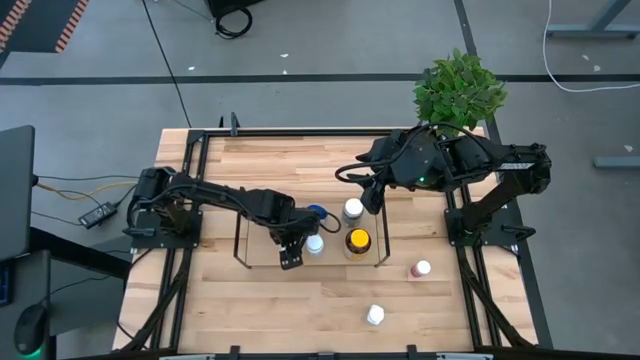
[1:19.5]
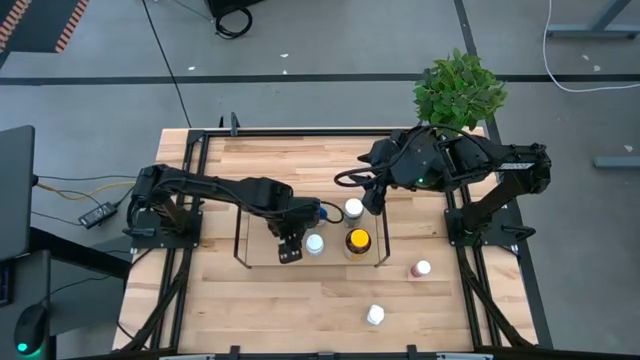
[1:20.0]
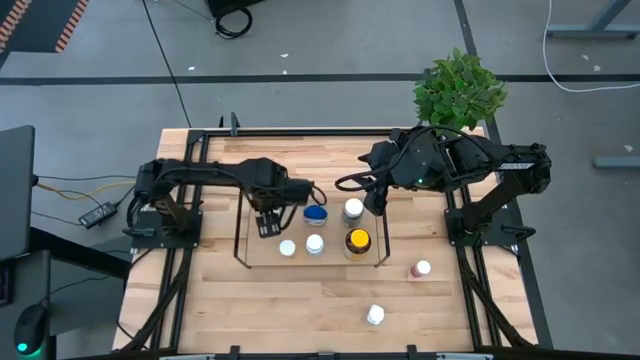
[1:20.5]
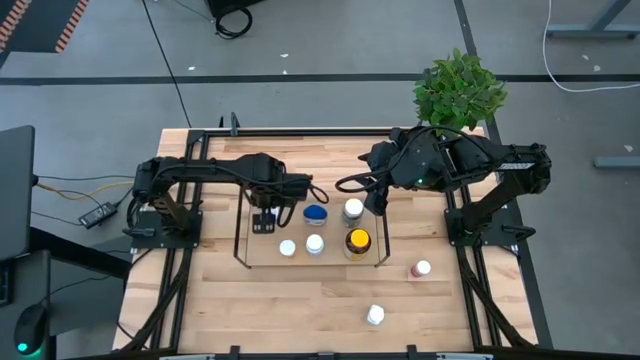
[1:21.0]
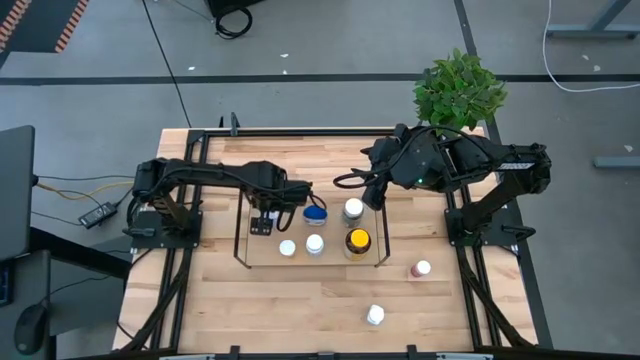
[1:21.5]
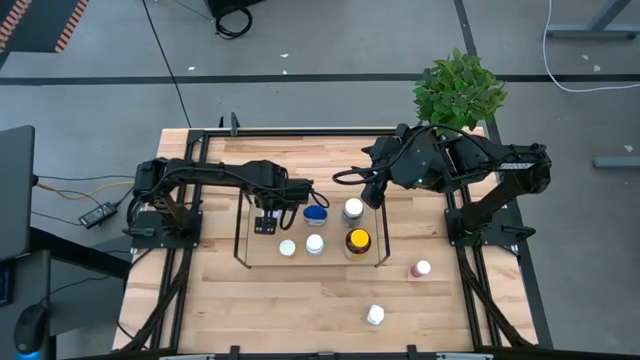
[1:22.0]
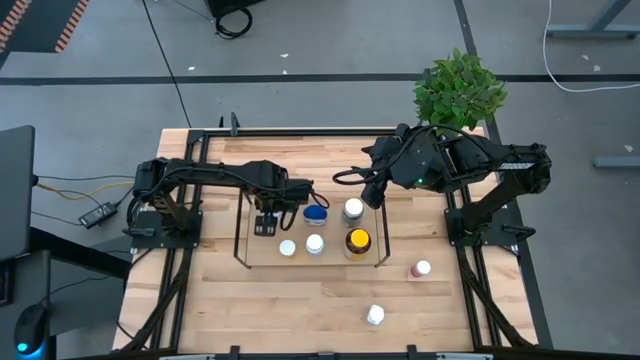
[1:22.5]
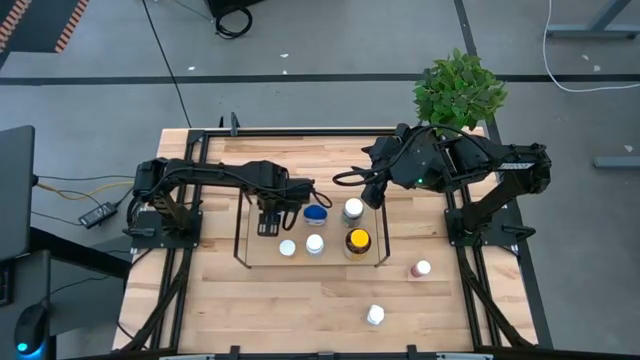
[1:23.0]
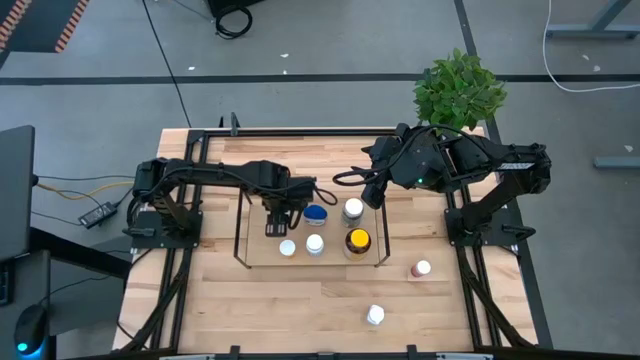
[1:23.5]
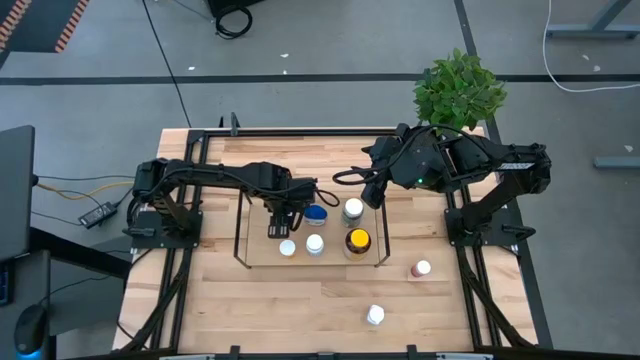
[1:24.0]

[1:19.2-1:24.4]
Task: Pick and place medicine bottles onto shelf by color
Adjust the white and blue medicine bottle on the shelf

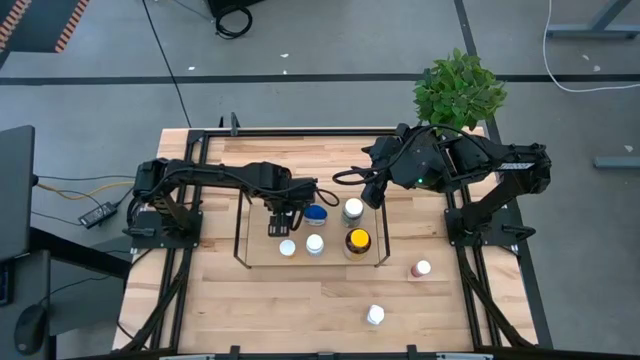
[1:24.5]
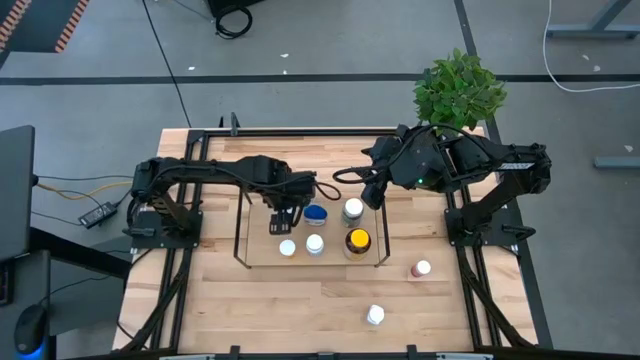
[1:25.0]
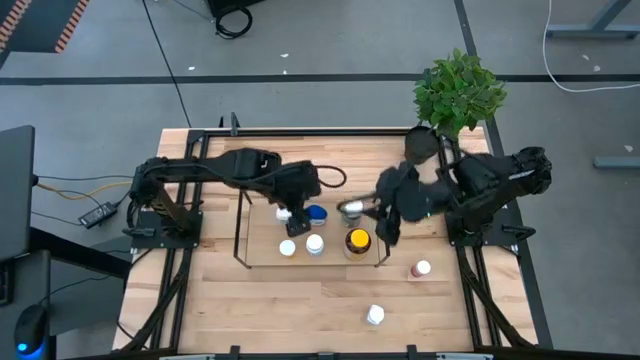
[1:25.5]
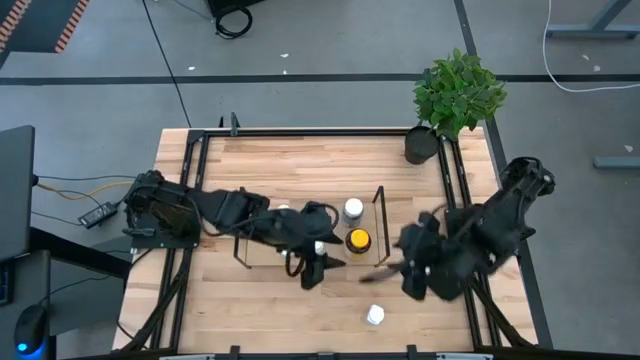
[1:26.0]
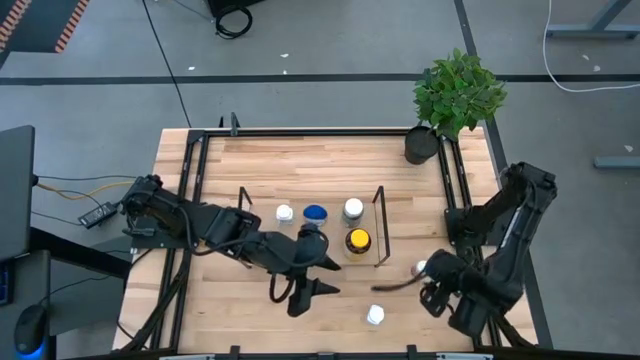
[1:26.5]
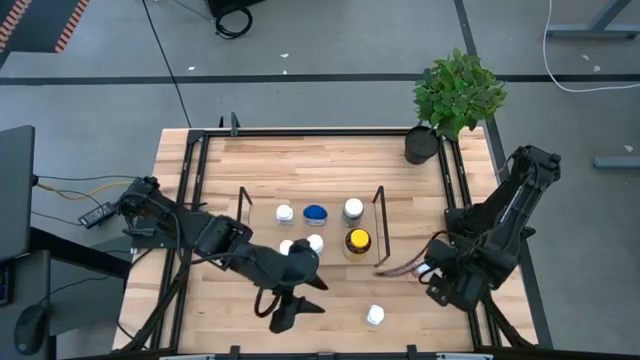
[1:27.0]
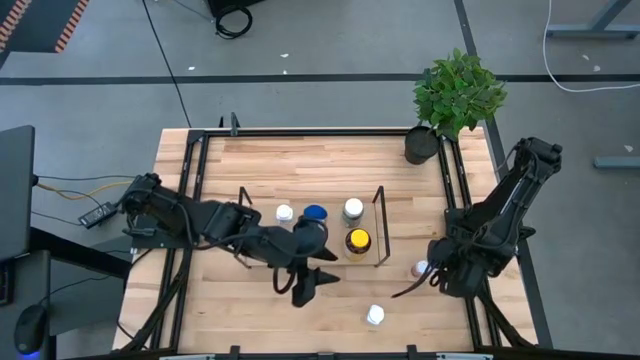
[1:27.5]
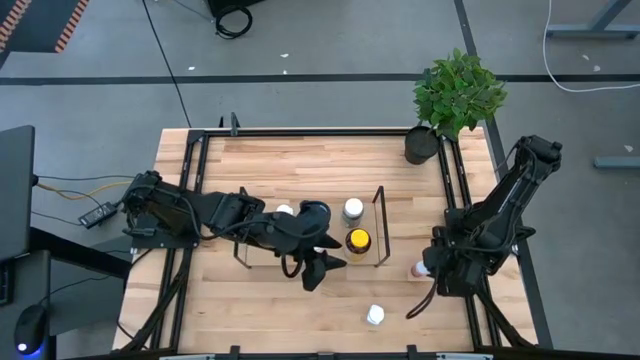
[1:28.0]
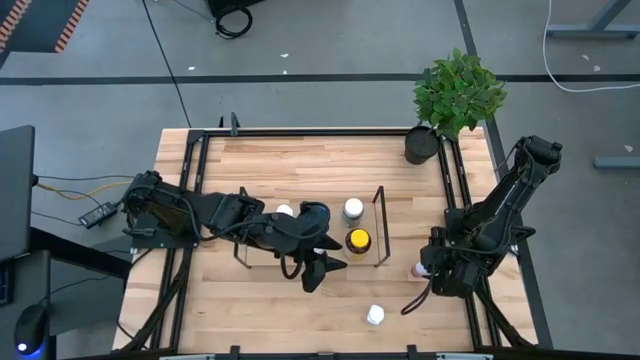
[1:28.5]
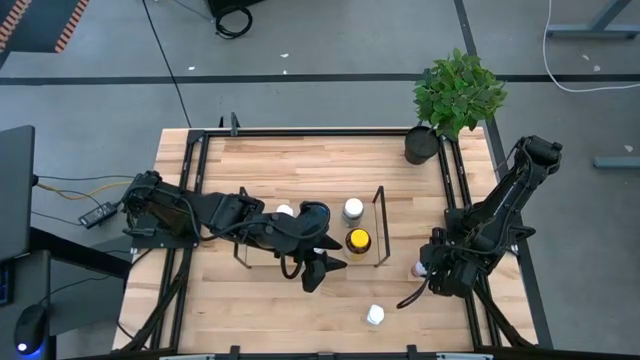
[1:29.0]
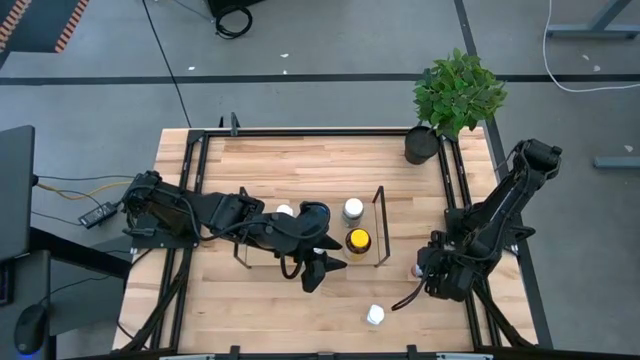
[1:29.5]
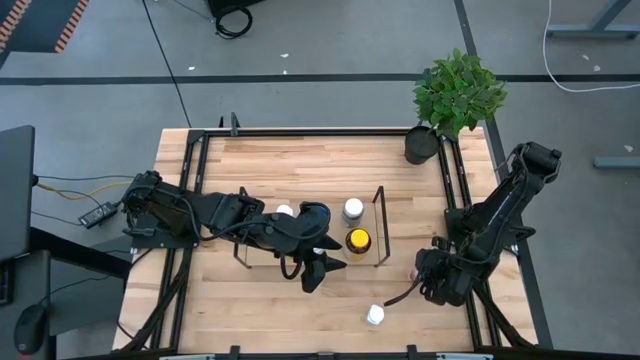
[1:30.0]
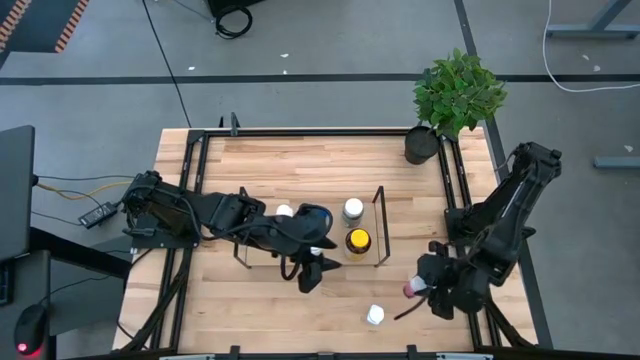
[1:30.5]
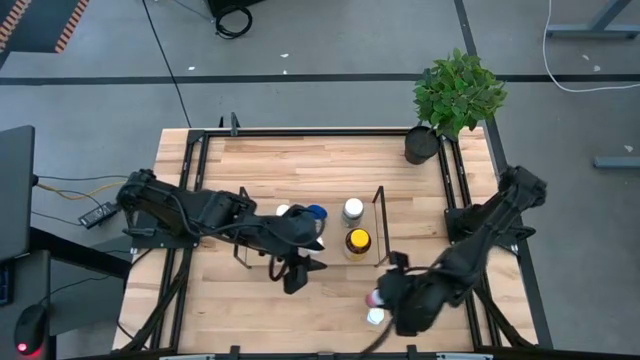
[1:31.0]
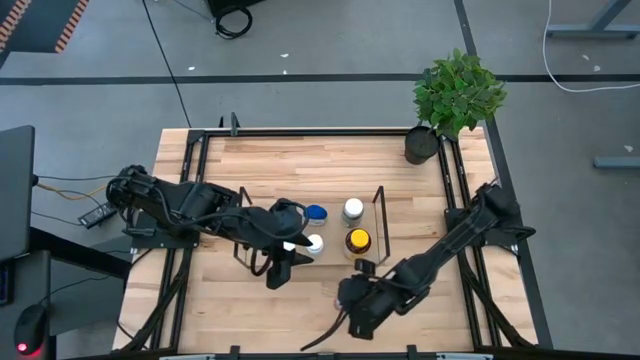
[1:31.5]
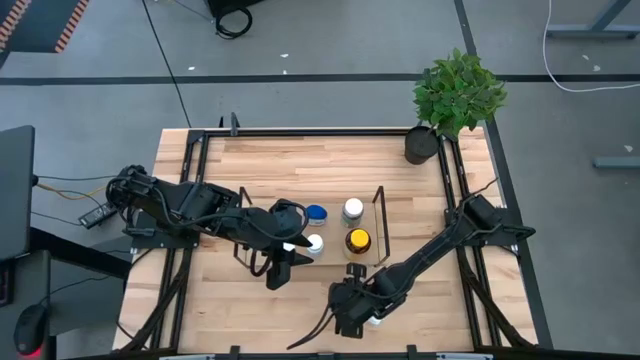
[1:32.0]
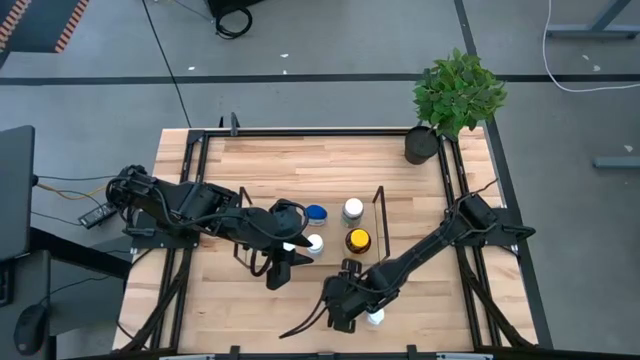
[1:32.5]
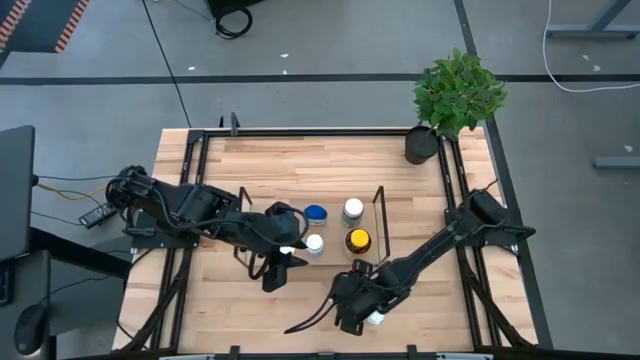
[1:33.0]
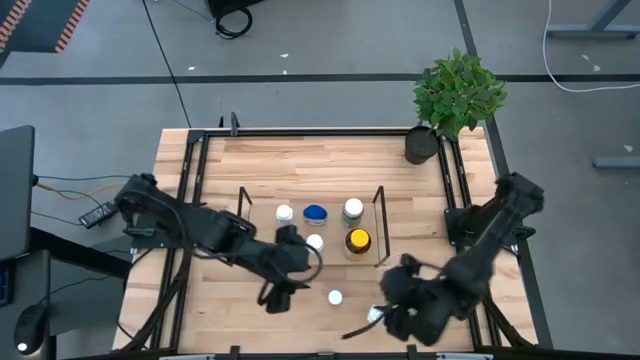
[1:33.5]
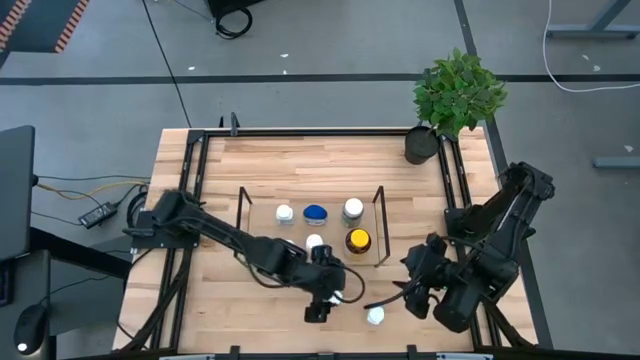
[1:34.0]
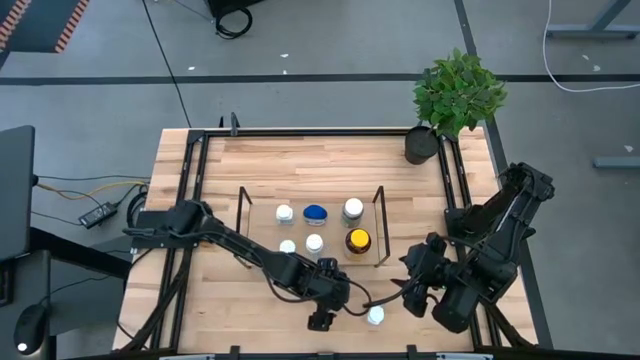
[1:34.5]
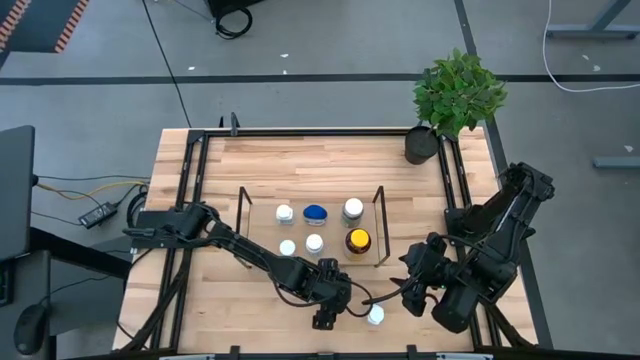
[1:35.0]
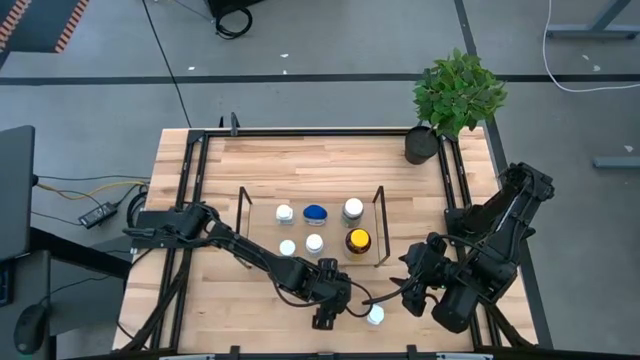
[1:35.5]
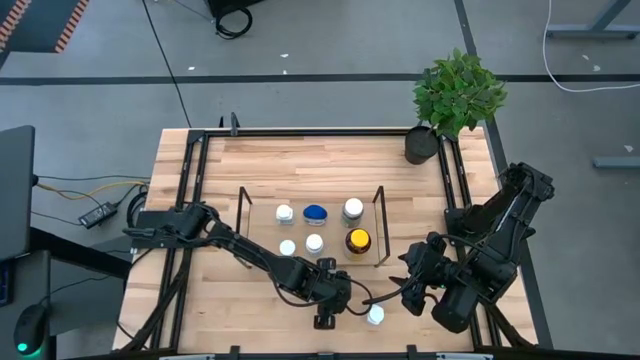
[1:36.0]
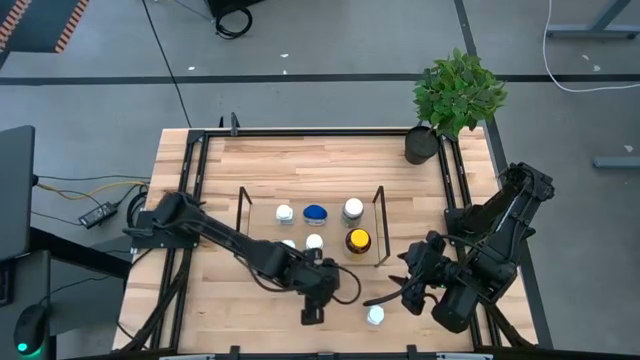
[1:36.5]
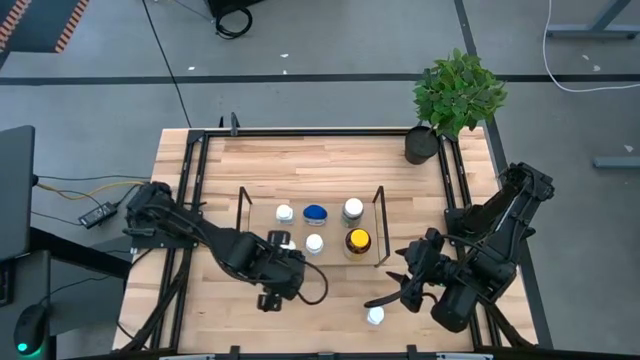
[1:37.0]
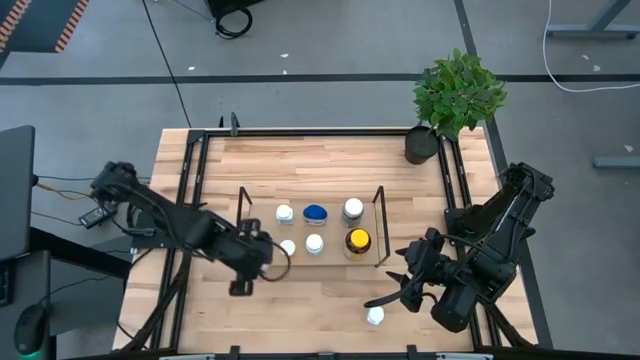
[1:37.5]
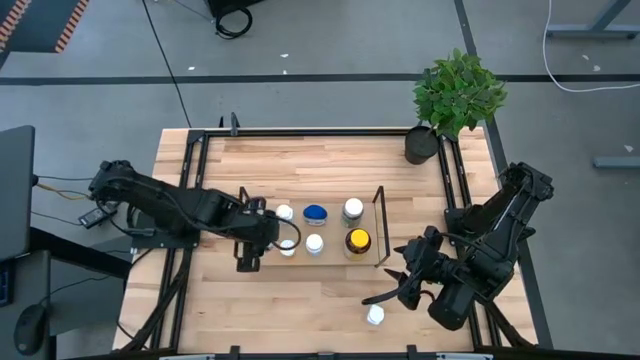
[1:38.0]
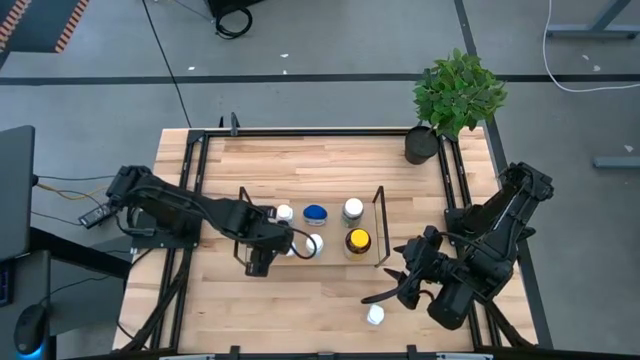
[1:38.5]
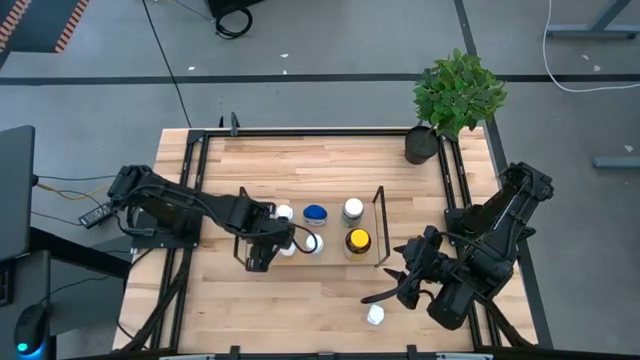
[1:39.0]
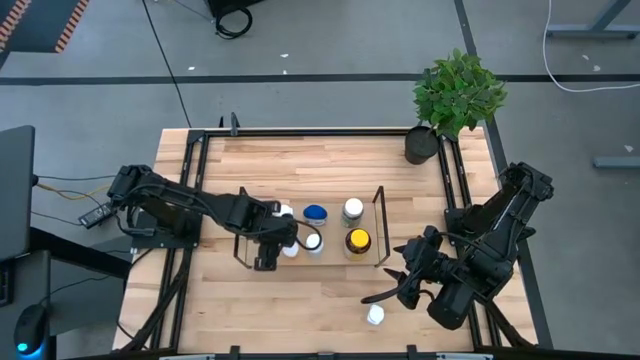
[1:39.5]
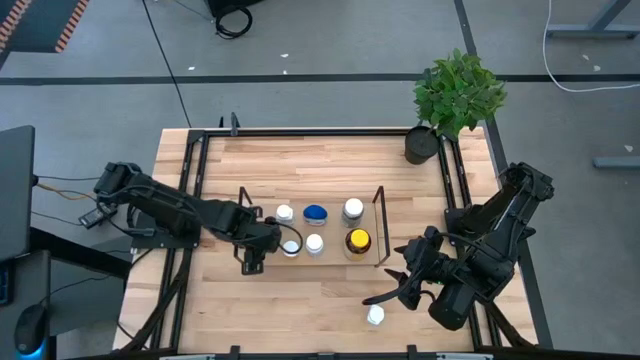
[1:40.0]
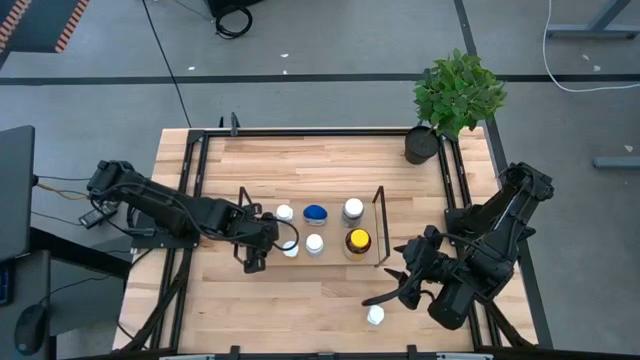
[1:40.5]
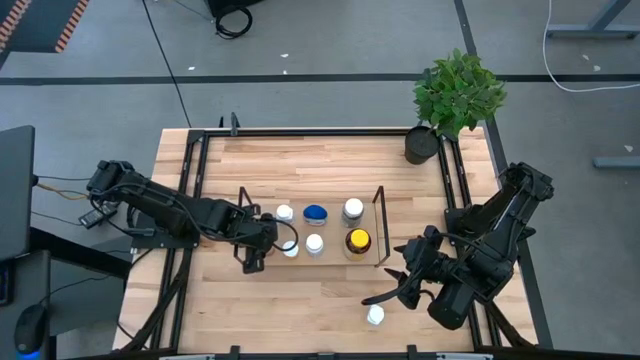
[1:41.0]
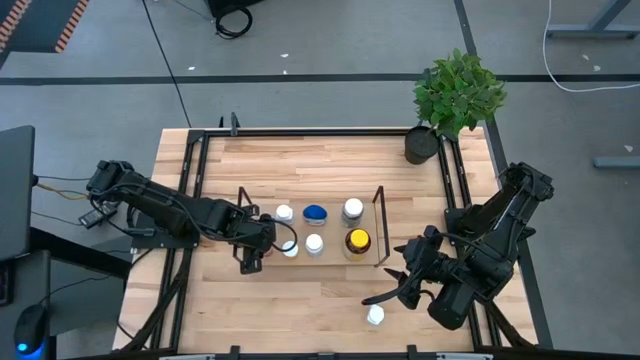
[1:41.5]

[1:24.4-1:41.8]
Put the pink medicine bottle on the shelf
